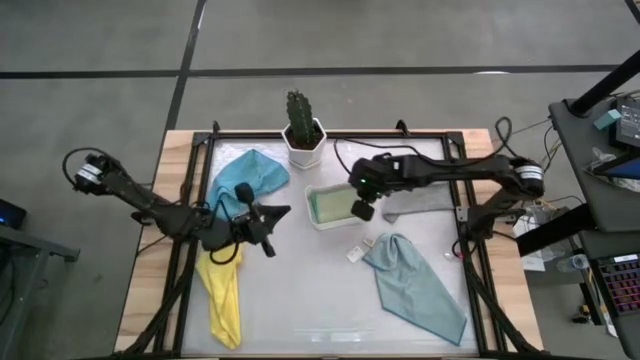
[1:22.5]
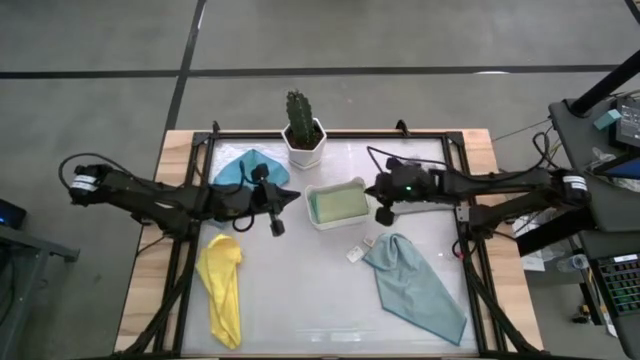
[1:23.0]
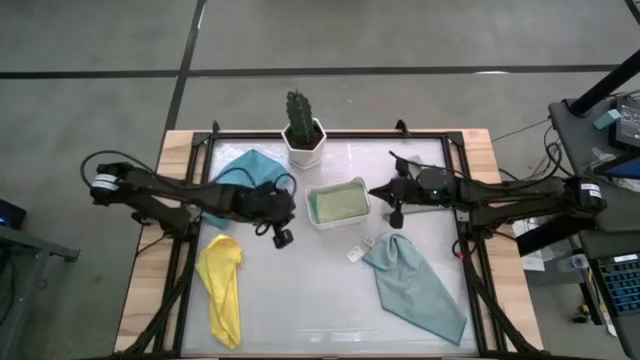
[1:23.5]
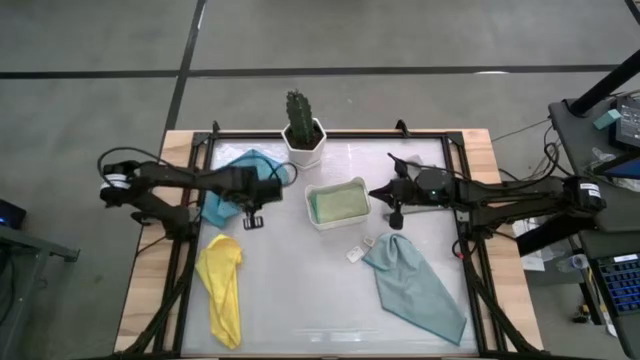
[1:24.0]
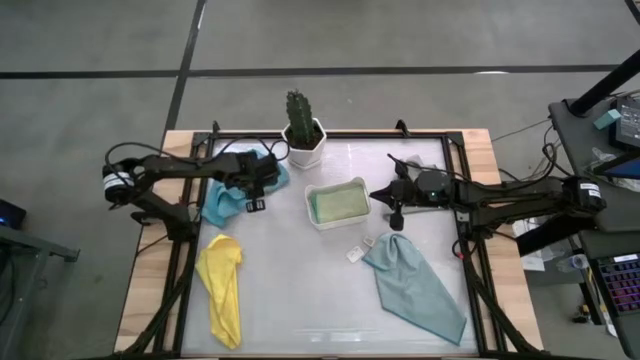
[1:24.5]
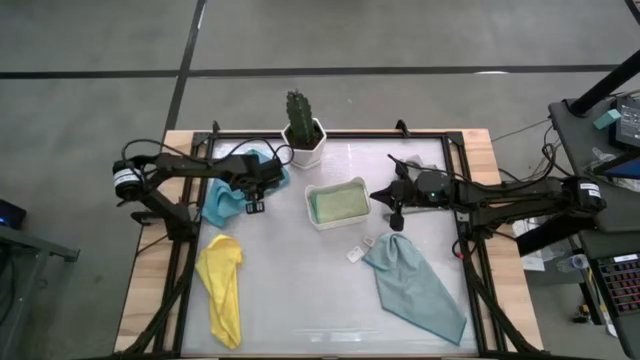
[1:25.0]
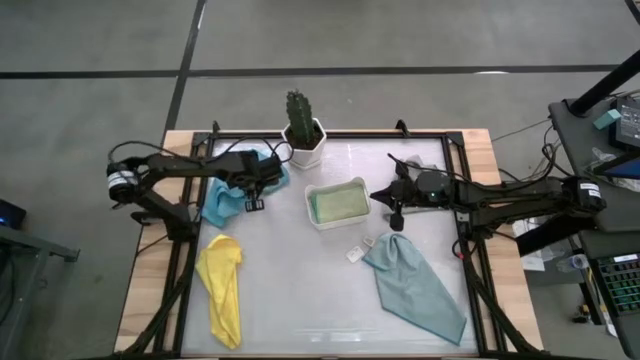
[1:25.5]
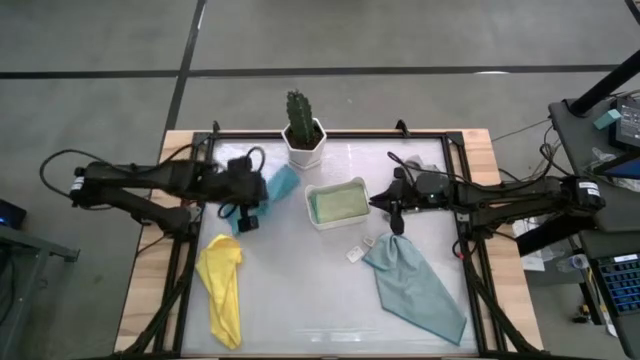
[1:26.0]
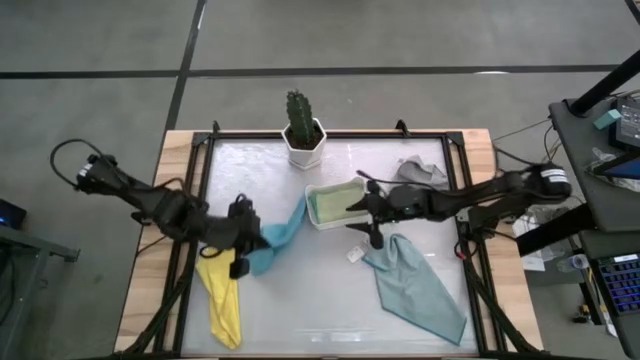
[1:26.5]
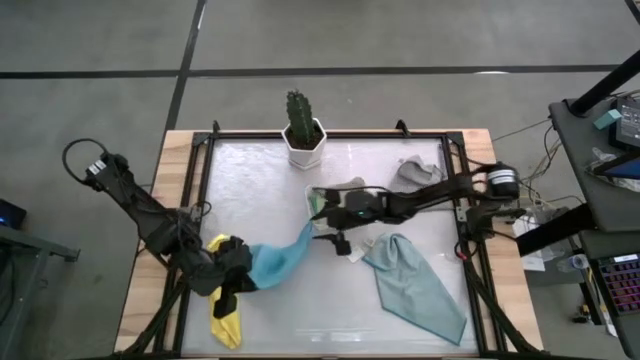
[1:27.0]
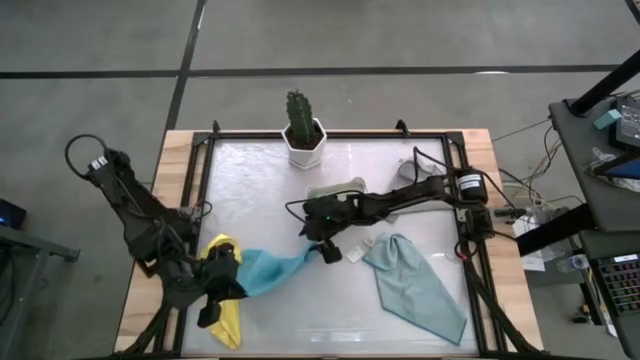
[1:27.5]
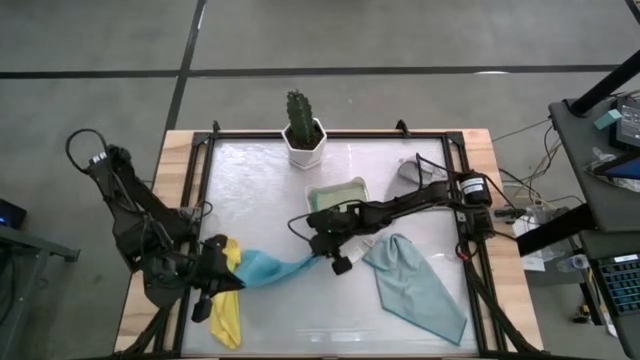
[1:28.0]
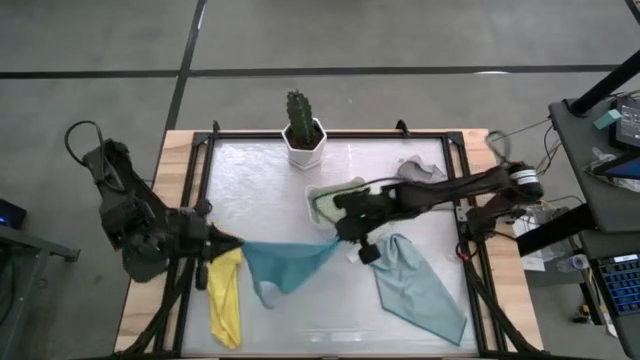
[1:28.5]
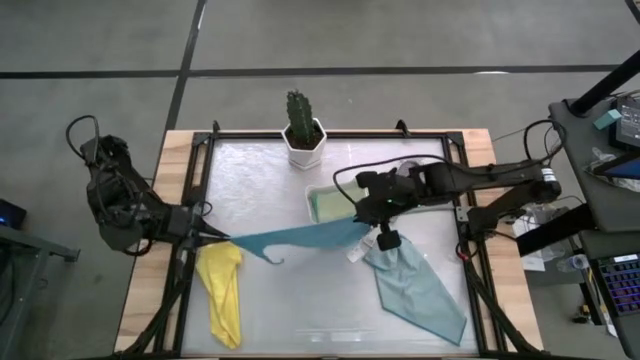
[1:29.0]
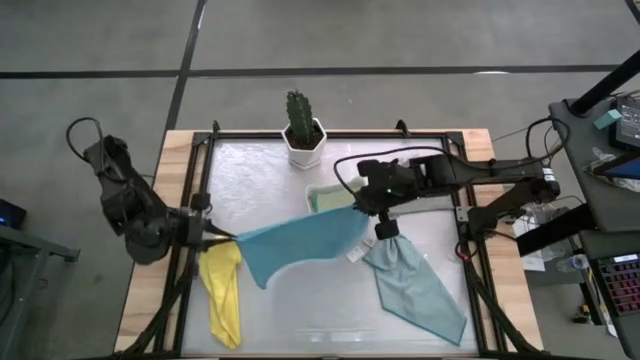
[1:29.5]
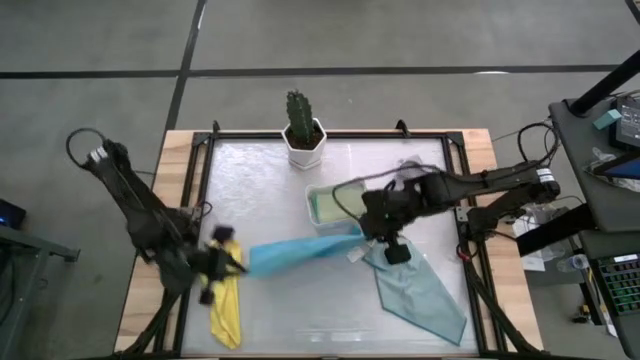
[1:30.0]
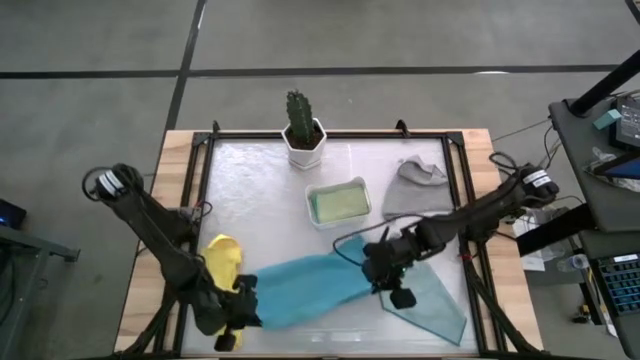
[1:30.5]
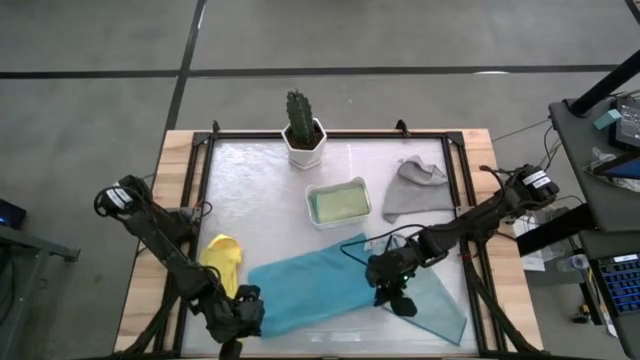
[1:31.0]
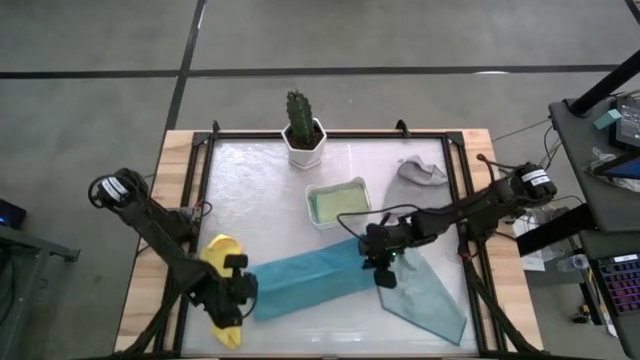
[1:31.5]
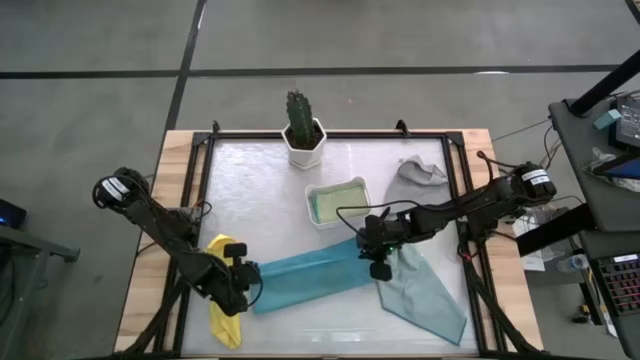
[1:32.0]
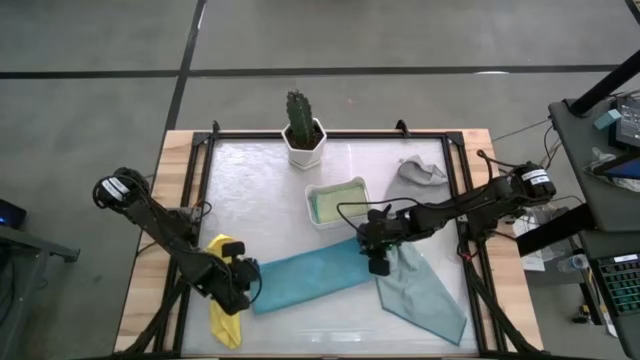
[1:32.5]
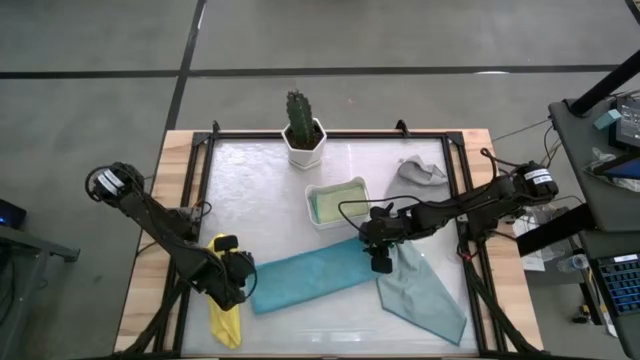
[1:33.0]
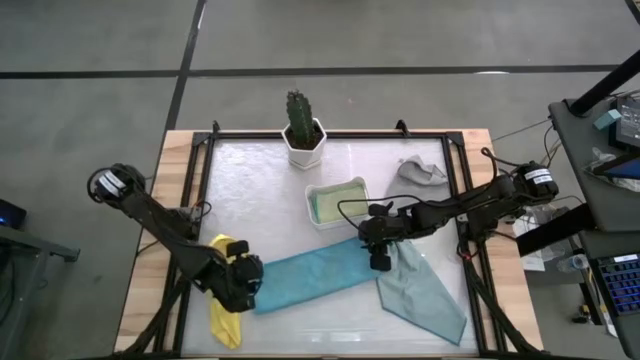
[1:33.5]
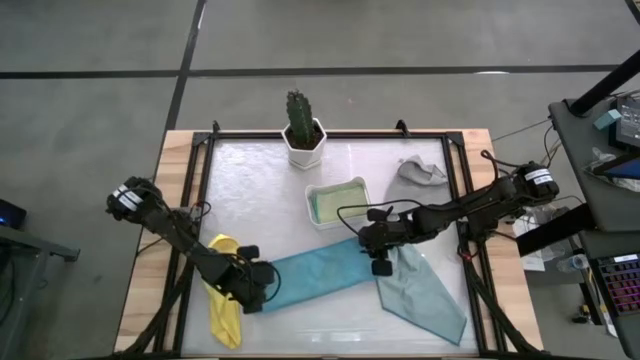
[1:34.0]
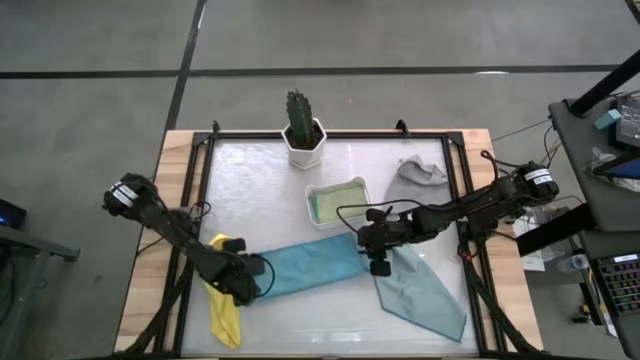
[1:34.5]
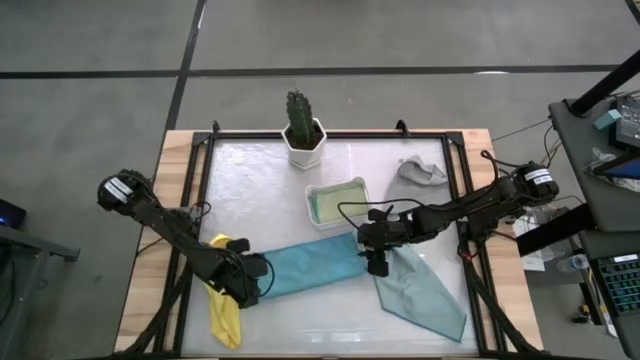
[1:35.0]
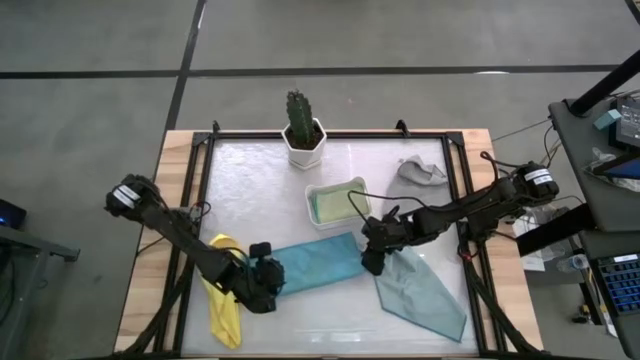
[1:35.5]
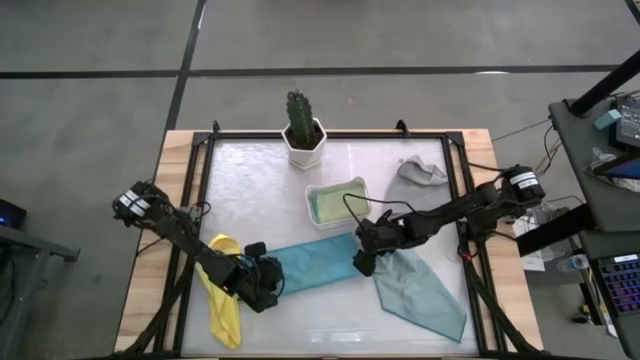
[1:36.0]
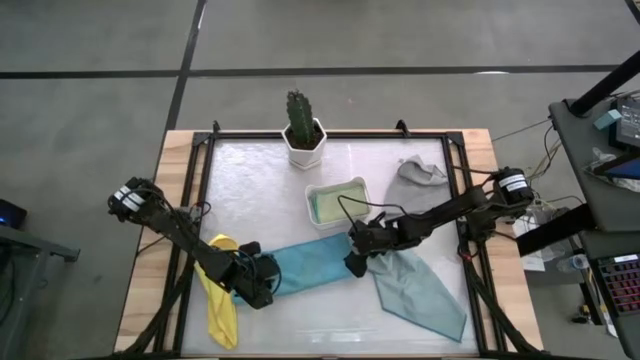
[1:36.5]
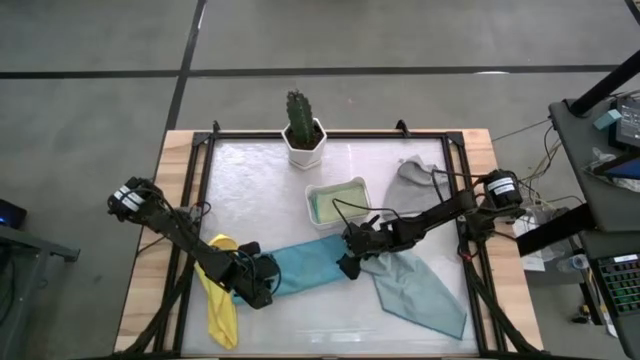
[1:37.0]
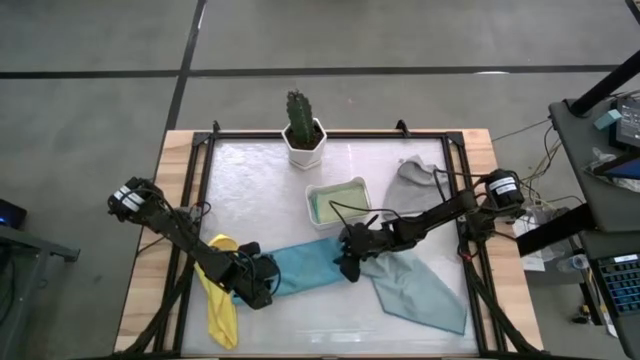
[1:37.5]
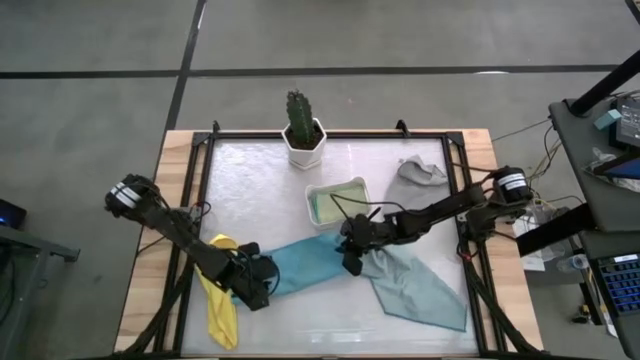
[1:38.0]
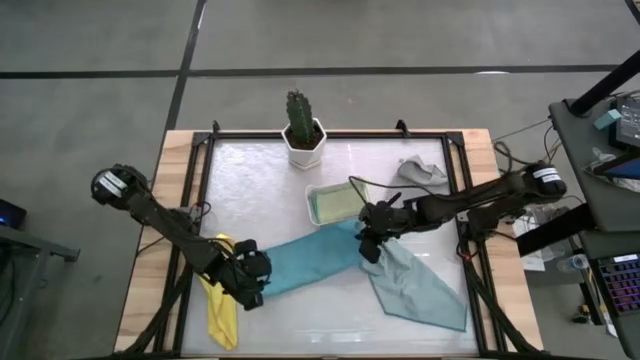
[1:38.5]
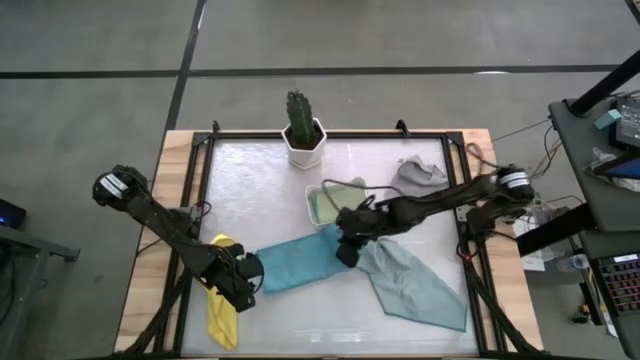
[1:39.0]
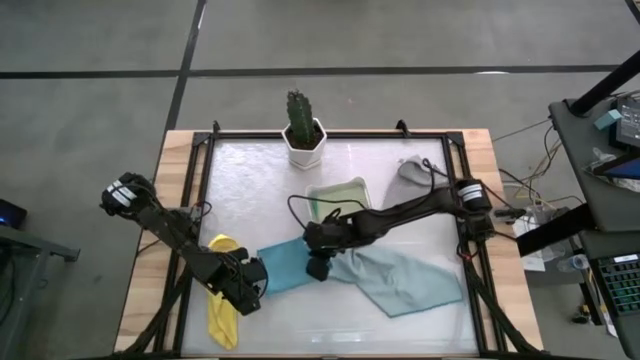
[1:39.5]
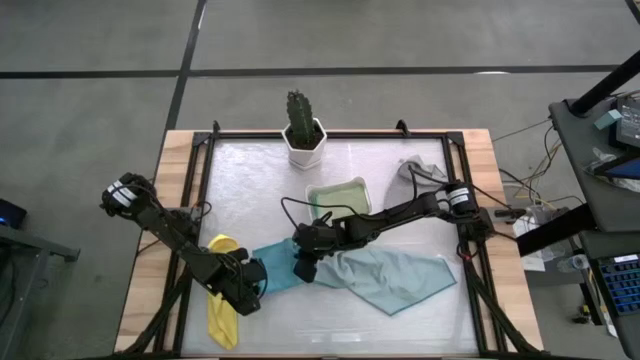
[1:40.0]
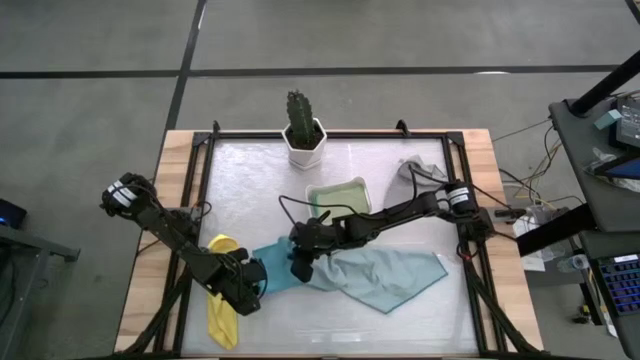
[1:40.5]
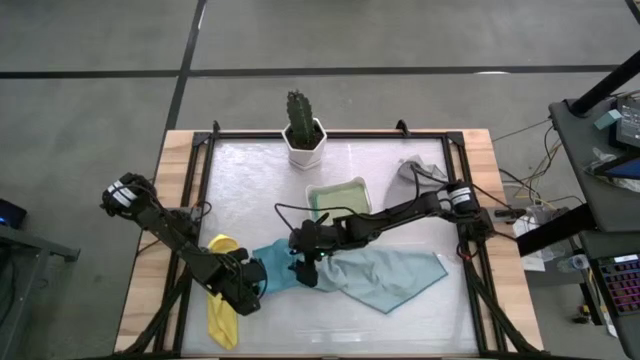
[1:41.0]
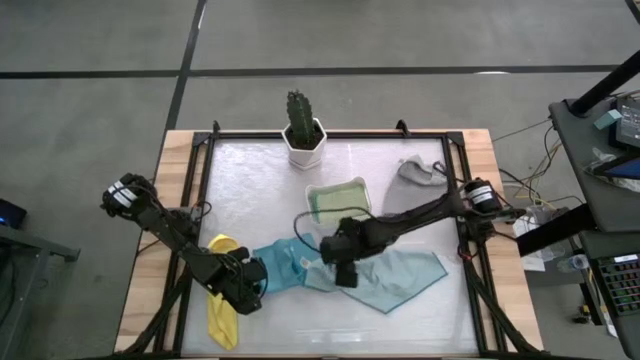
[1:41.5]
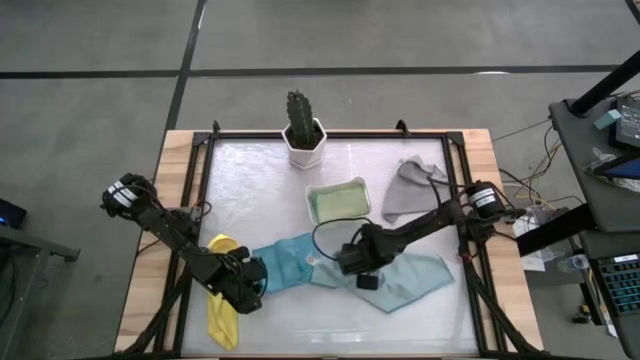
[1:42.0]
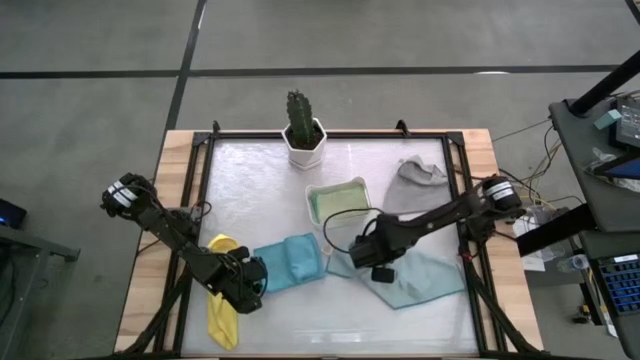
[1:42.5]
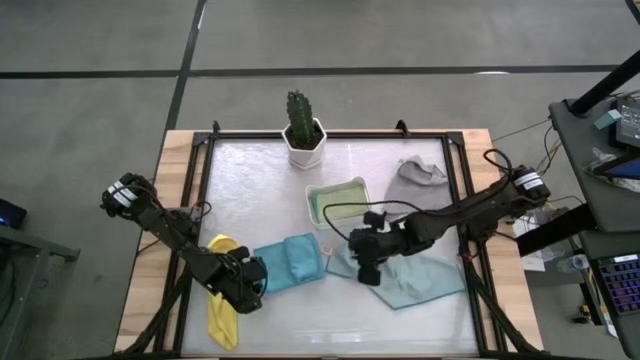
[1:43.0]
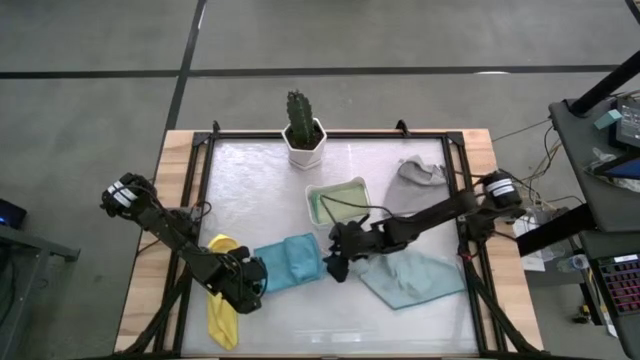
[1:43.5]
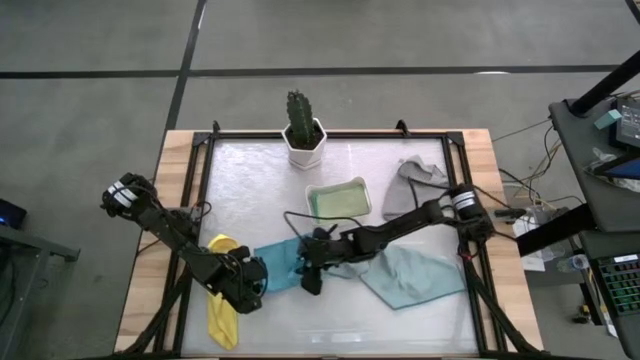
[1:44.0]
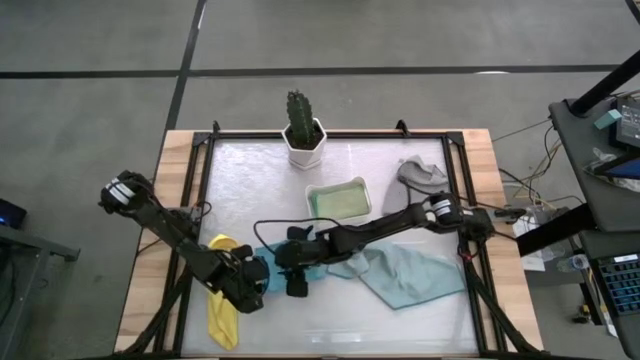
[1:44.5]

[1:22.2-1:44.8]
Task: Fold microfiber towels
Fold the dark blue towel
